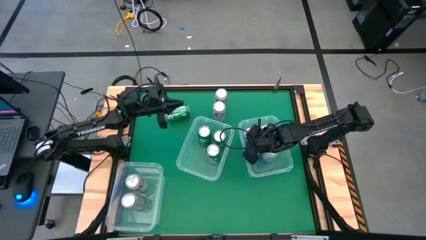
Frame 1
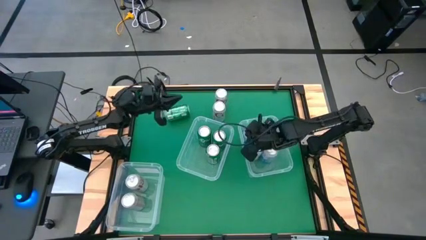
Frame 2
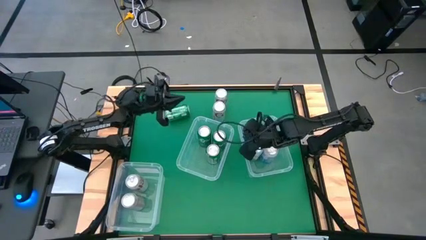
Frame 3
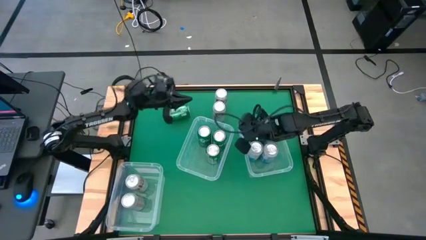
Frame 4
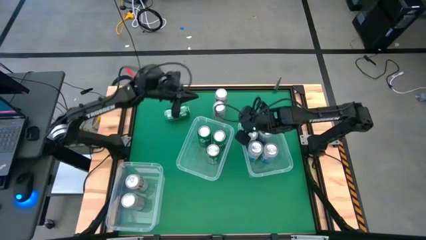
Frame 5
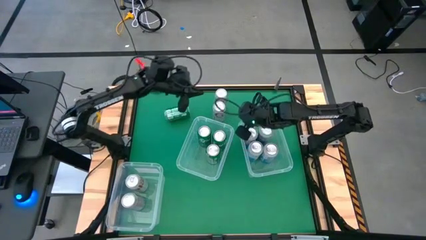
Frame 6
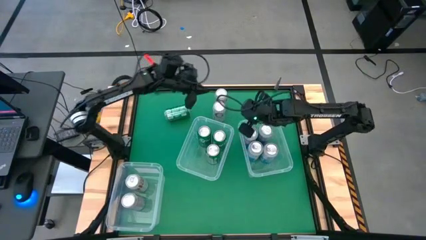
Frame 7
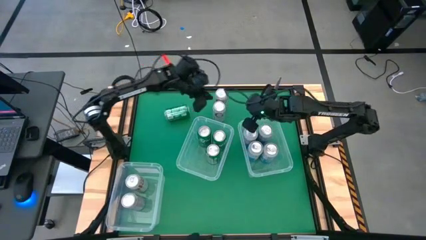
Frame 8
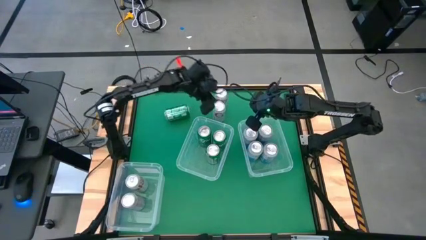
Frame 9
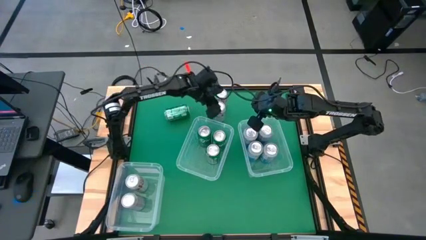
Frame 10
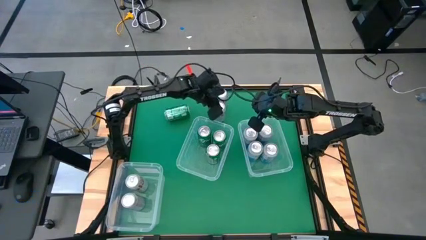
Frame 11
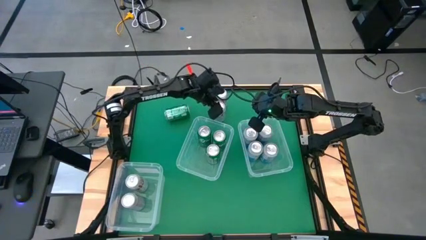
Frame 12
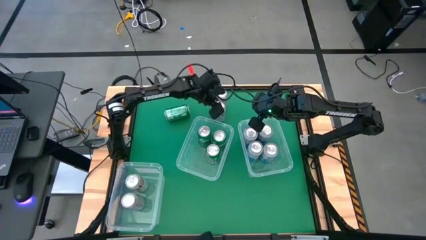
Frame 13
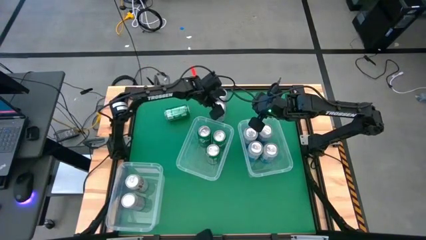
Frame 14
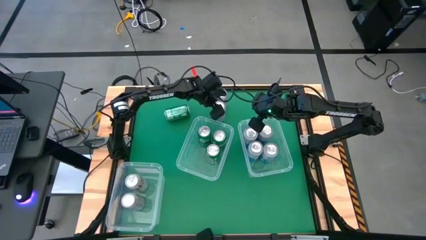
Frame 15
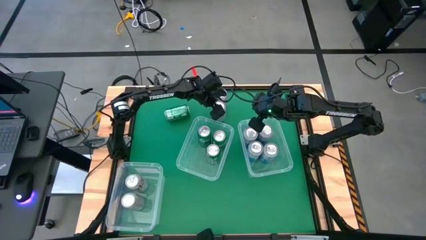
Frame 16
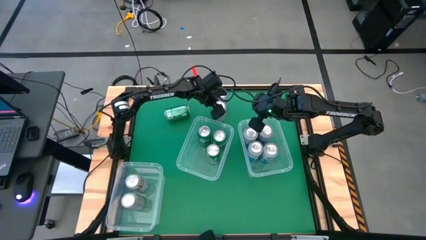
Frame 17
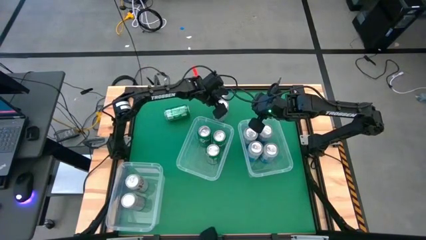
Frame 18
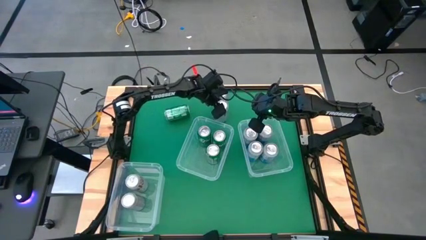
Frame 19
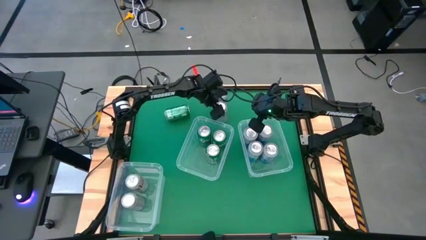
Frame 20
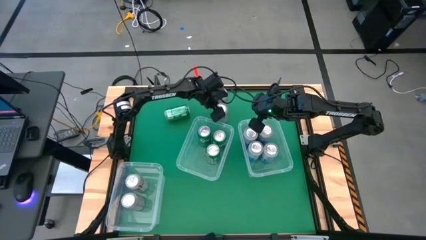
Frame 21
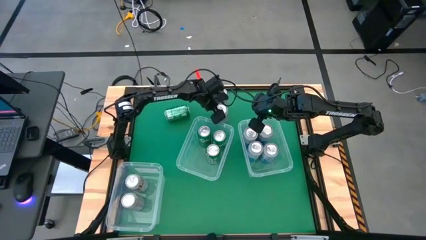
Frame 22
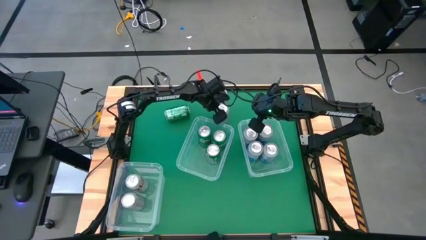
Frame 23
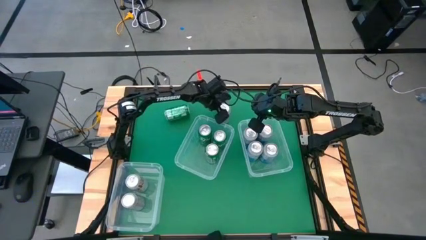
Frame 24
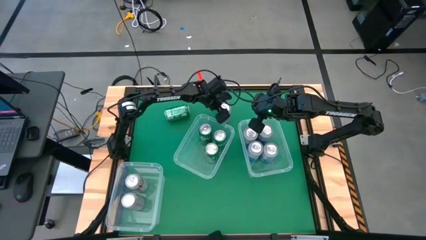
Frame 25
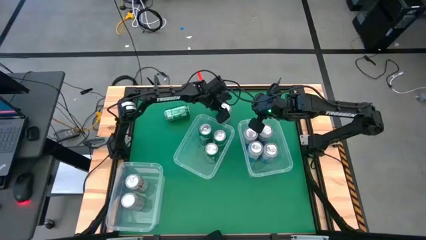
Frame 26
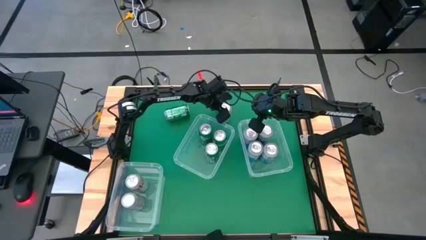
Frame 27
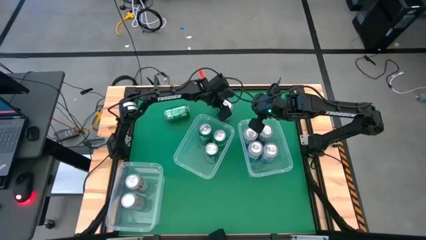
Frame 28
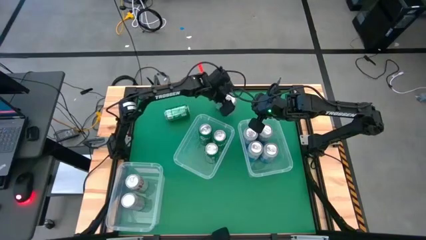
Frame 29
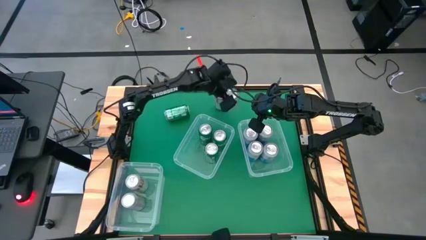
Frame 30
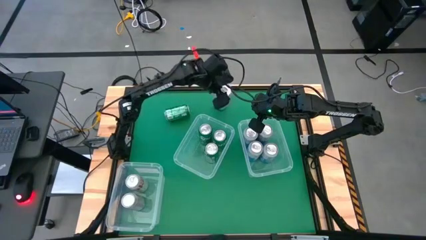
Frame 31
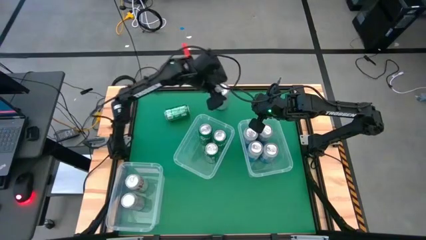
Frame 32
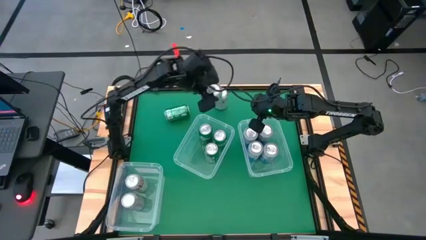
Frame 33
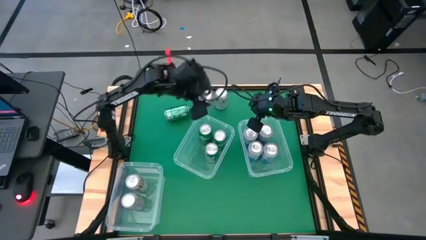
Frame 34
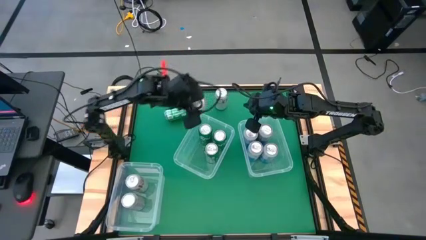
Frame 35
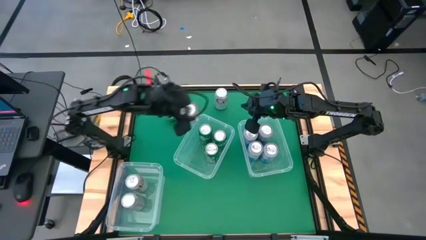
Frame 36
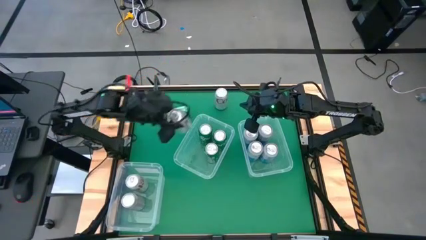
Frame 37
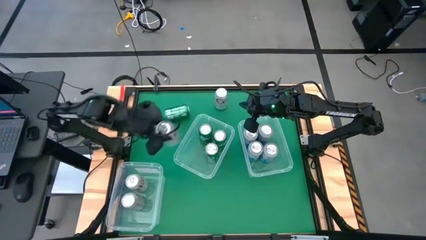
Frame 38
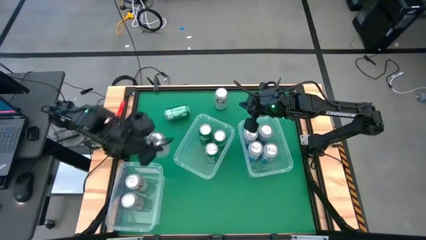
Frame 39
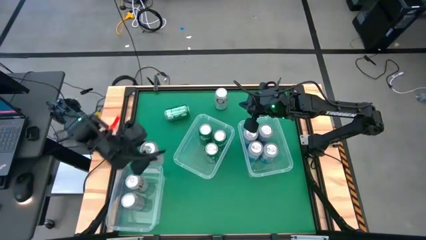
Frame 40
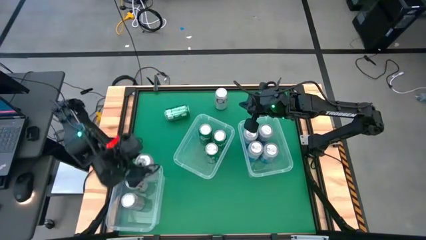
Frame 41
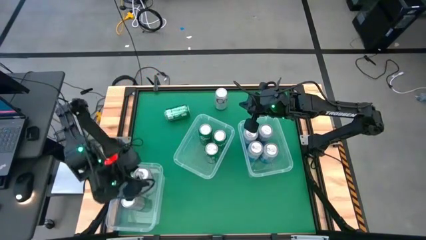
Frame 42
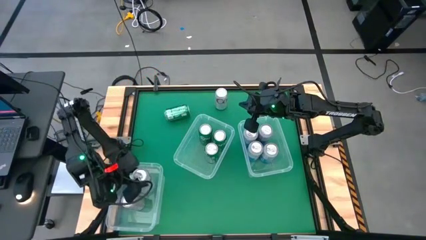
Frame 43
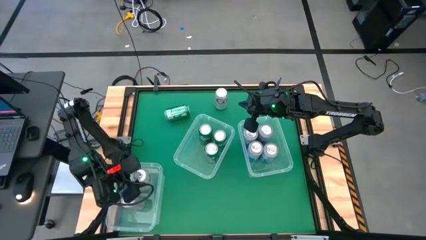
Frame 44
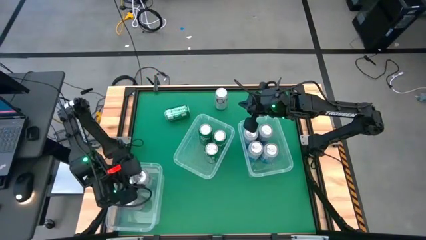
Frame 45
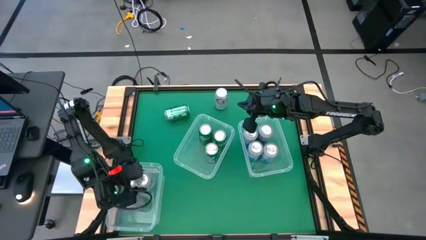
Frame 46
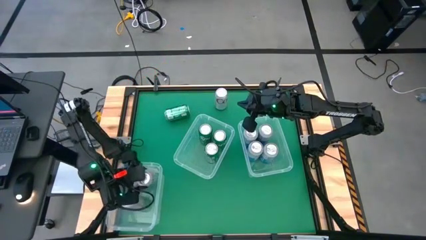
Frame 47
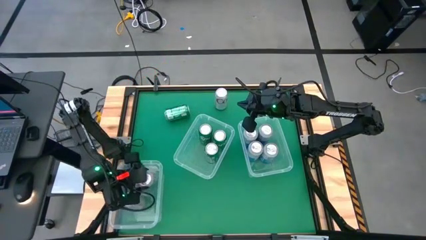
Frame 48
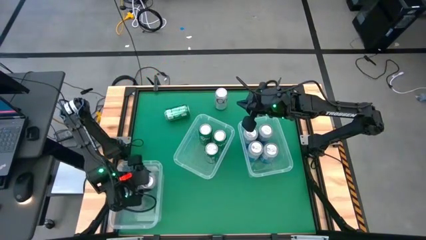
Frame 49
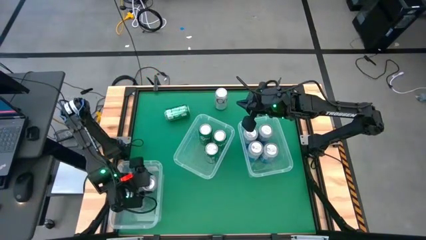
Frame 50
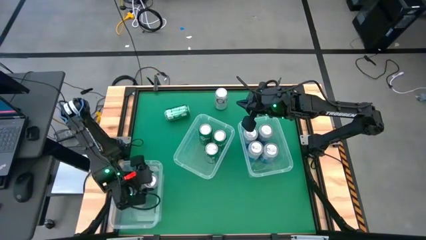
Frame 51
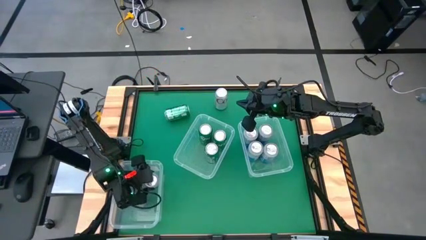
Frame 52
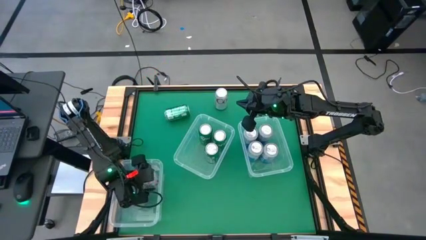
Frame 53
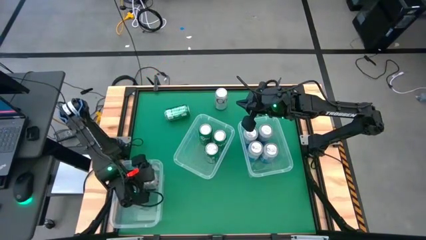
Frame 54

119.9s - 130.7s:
Task: Sort soda cans
Put the silver soda can into the bottom left transparent bin

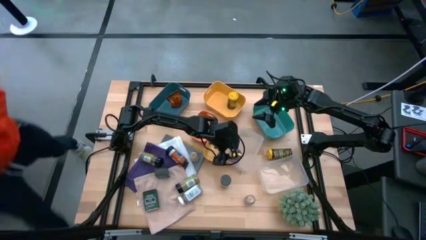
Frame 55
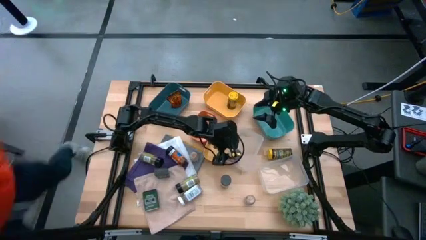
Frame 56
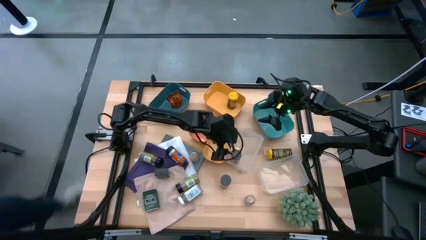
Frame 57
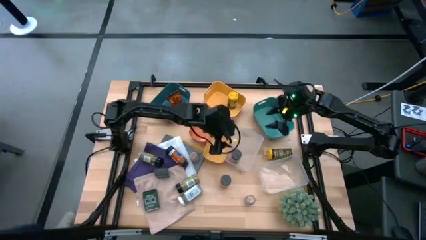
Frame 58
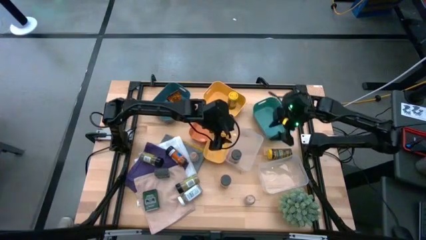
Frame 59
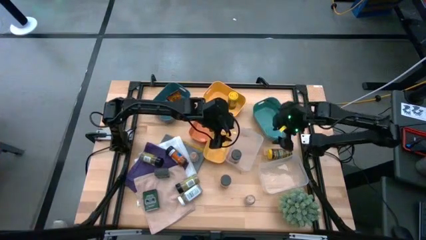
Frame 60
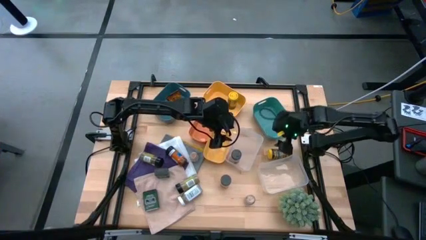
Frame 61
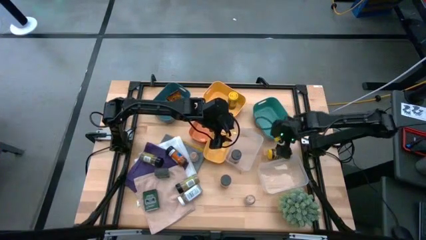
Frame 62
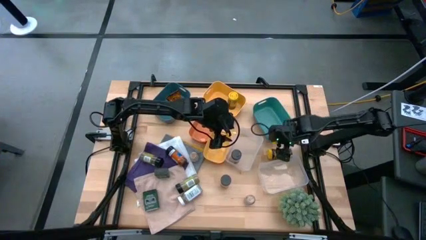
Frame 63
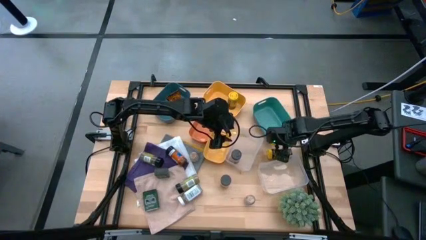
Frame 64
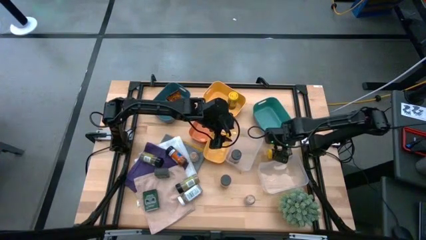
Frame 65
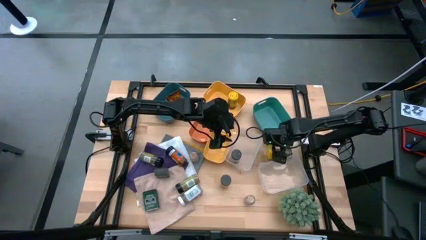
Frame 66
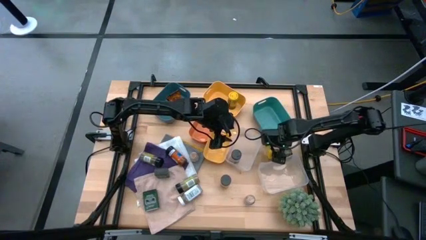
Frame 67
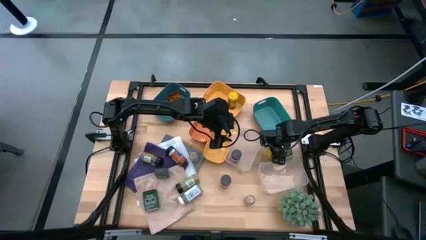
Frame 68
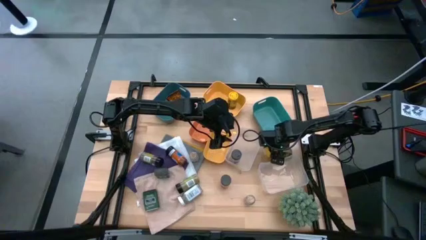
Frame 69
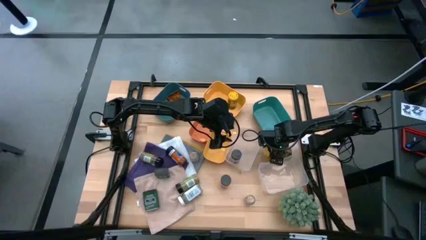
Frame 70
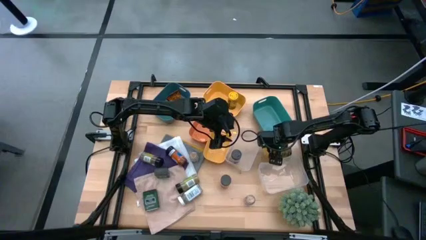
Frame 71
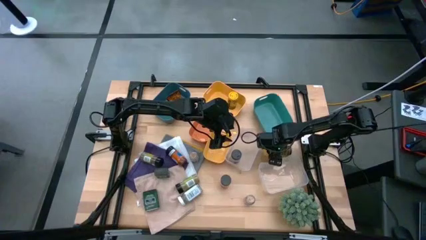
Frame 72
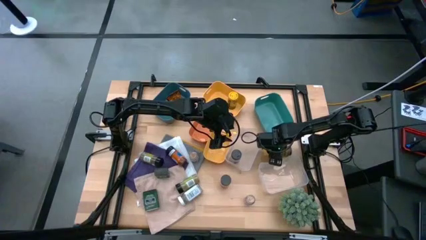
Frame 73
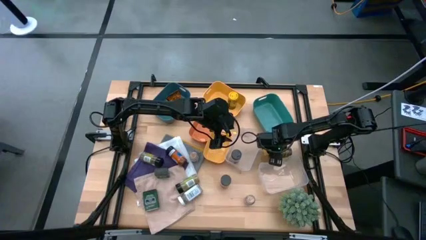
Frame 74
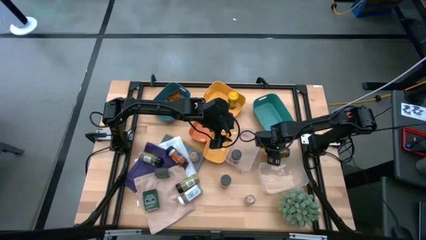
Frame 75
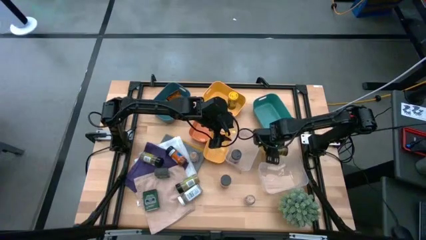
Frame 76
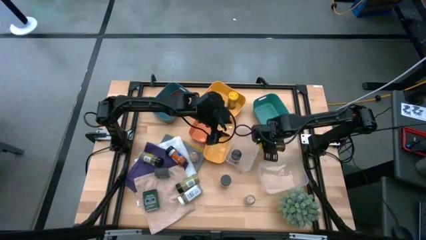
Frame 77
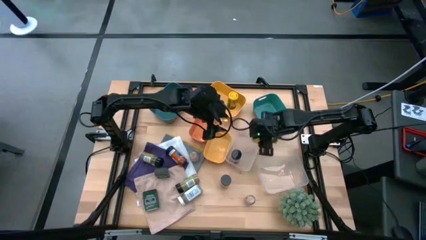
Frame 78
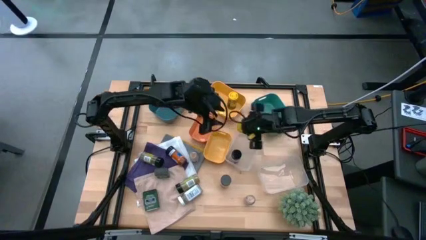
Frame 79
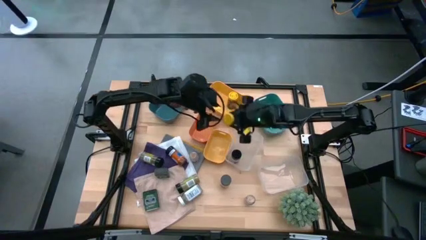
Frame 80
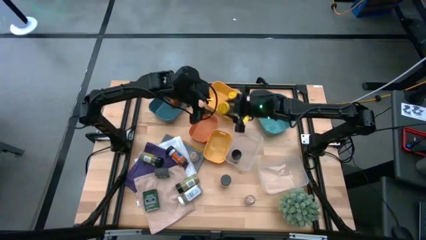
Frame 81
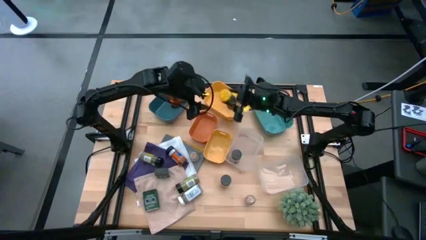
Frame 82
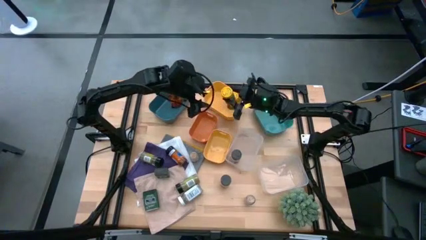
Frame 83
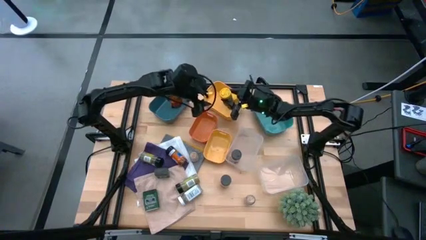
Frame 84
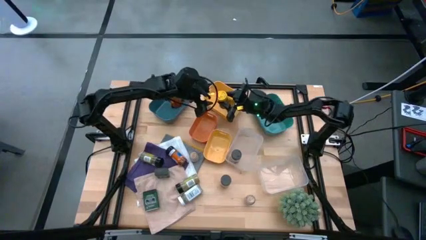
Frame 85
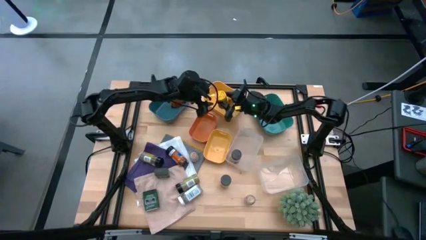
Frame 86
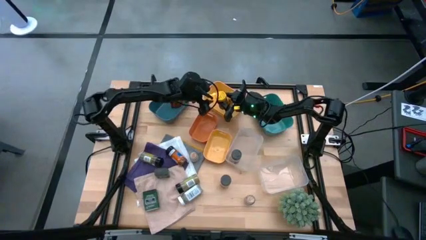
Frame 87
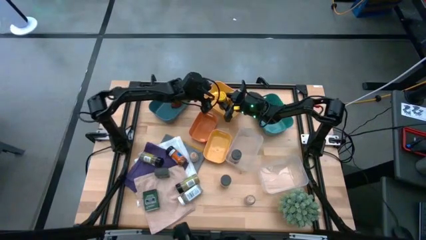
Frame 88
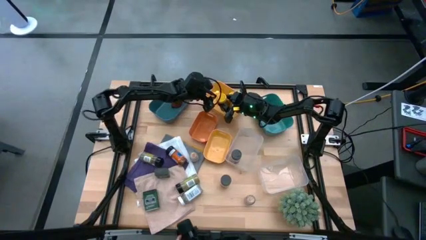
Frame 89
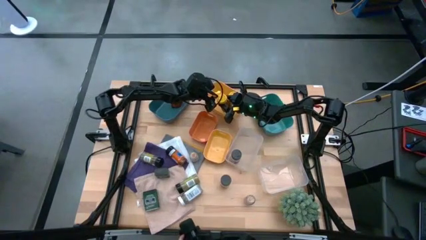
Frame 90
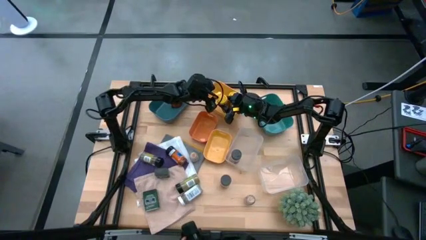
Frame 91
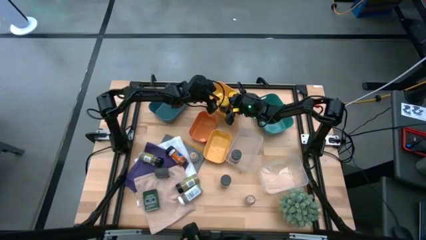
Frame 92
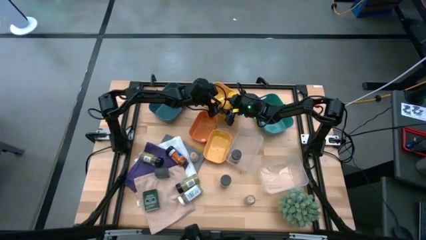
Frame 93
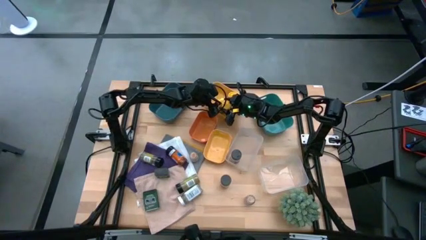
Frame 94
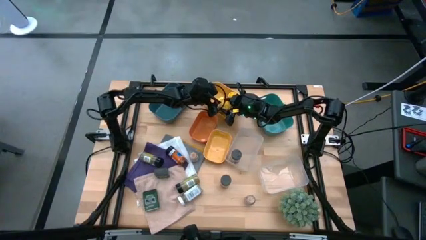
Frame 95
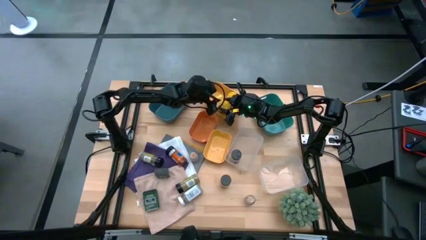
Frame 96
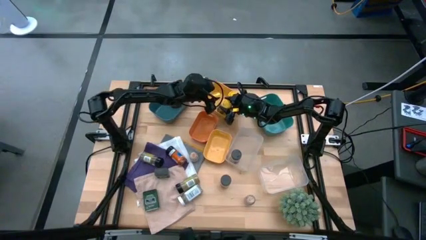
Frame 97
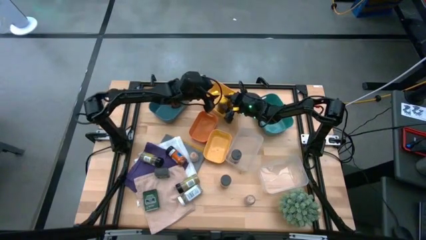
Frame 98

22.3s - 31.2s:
Task: Sort spices by type
Put the yellow seasoning bottle into the big yellow bin
